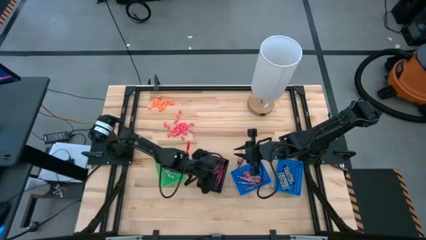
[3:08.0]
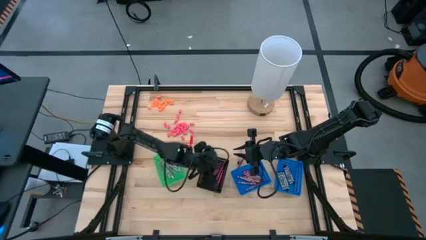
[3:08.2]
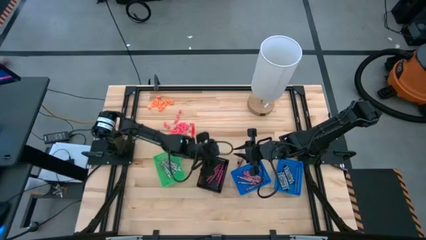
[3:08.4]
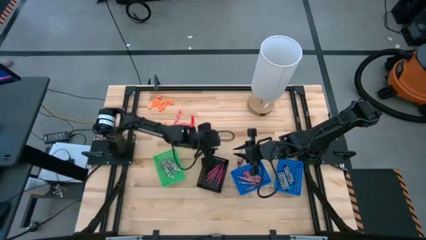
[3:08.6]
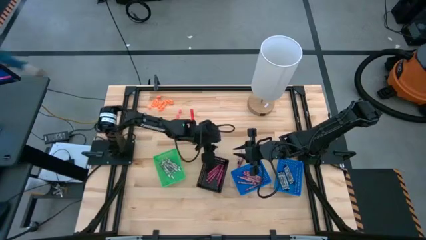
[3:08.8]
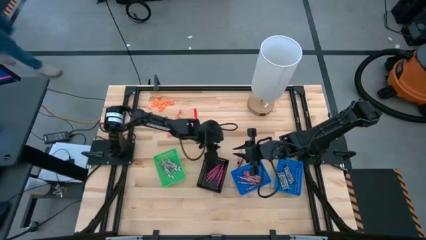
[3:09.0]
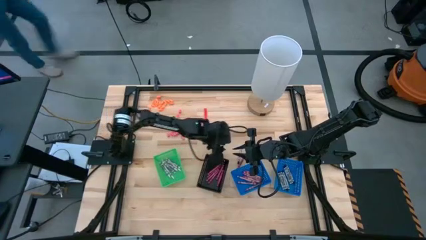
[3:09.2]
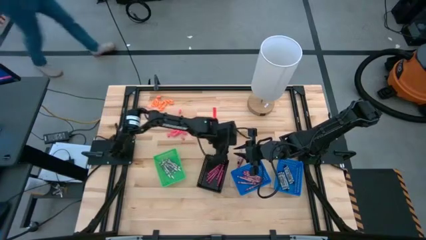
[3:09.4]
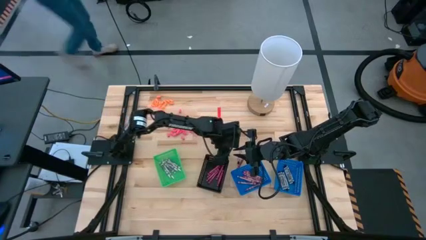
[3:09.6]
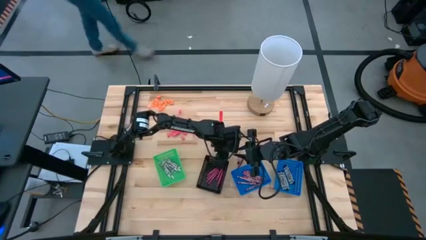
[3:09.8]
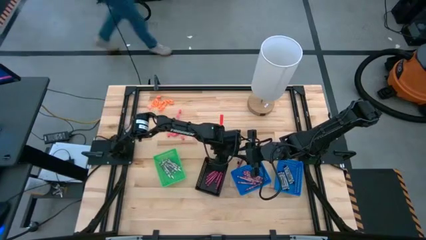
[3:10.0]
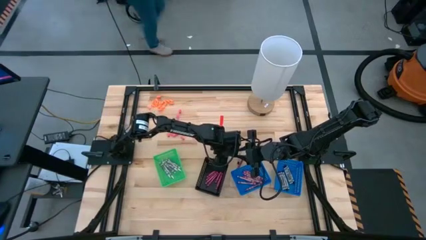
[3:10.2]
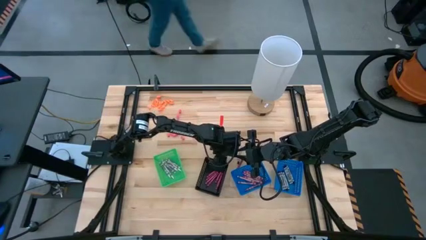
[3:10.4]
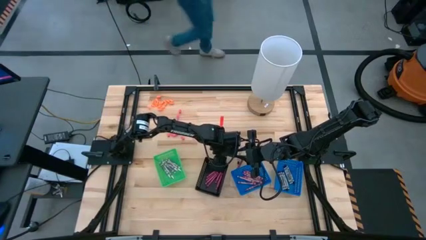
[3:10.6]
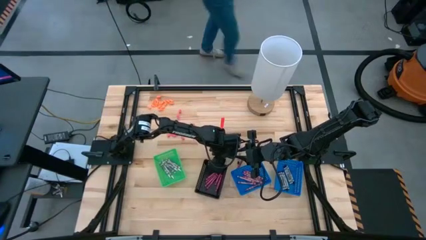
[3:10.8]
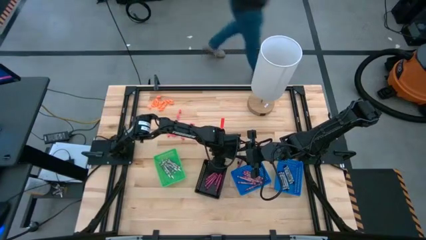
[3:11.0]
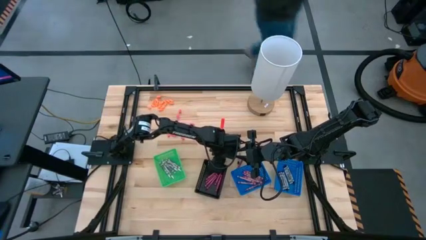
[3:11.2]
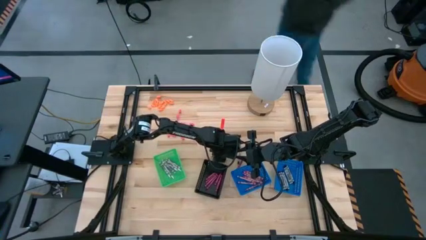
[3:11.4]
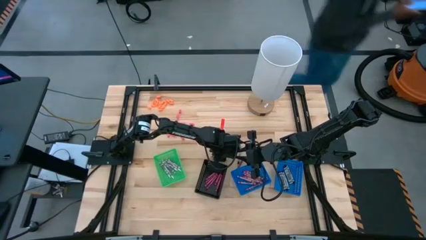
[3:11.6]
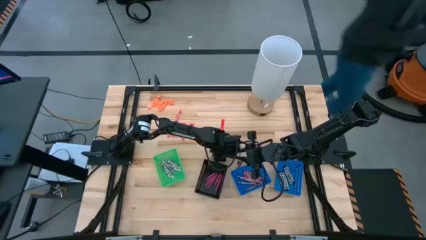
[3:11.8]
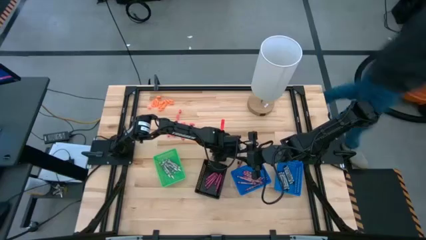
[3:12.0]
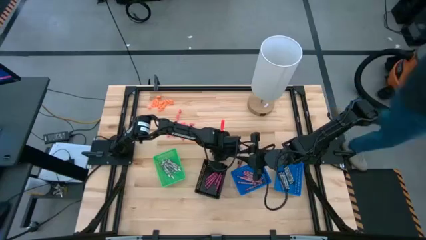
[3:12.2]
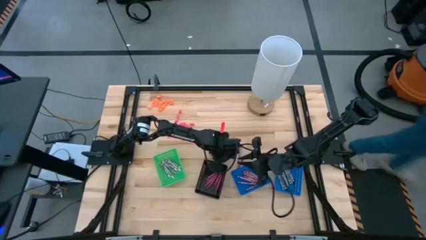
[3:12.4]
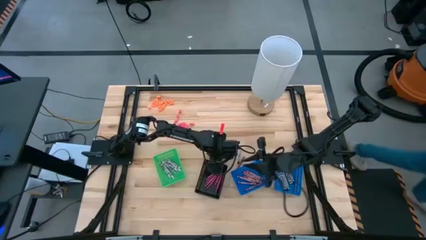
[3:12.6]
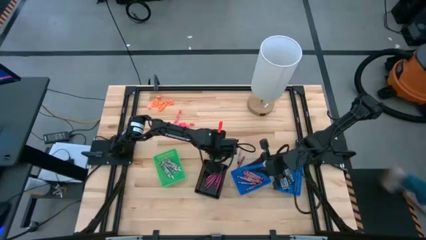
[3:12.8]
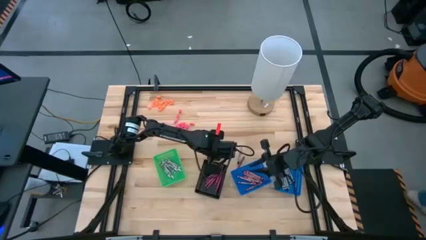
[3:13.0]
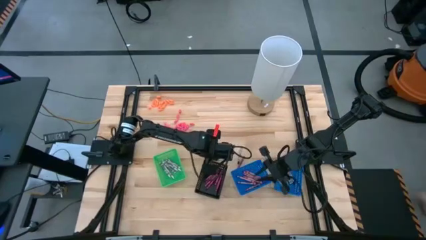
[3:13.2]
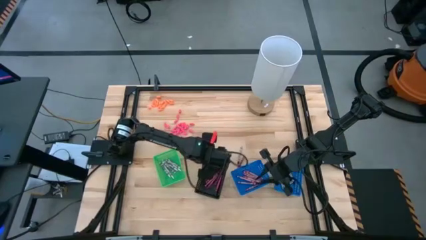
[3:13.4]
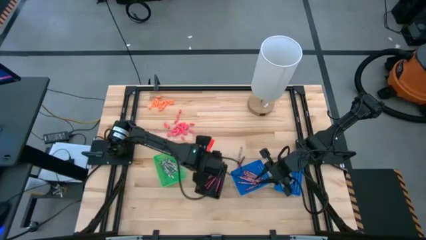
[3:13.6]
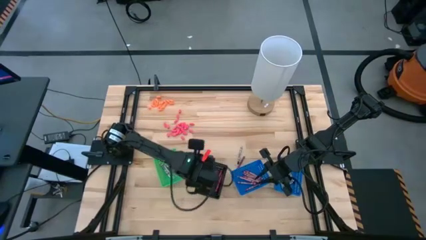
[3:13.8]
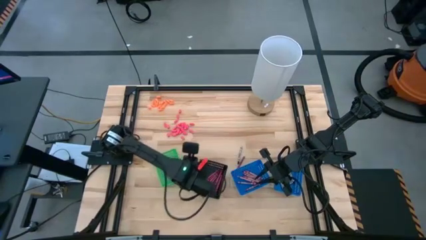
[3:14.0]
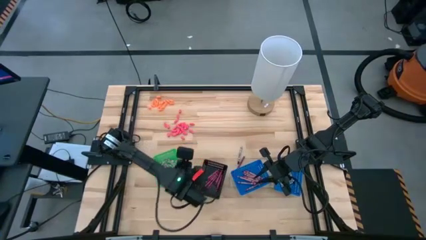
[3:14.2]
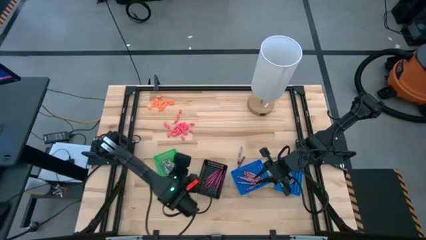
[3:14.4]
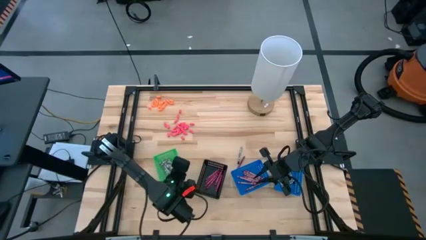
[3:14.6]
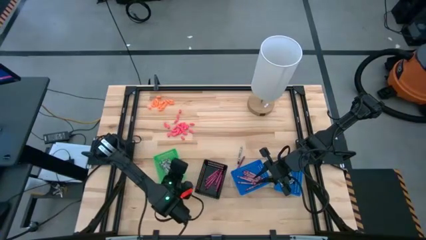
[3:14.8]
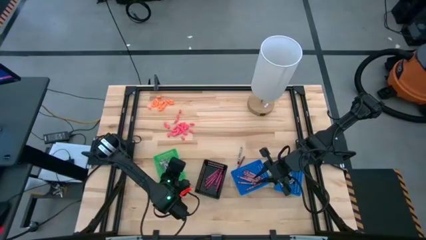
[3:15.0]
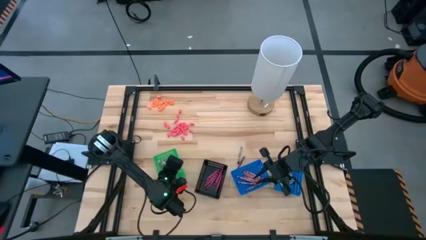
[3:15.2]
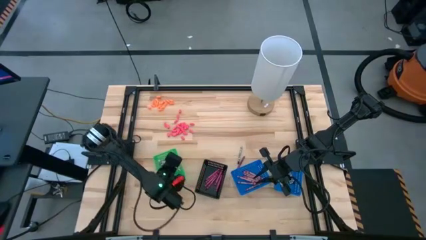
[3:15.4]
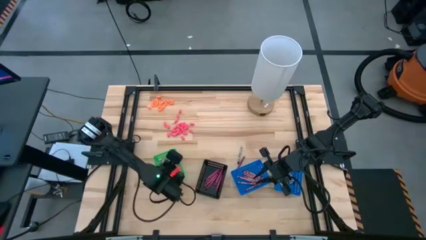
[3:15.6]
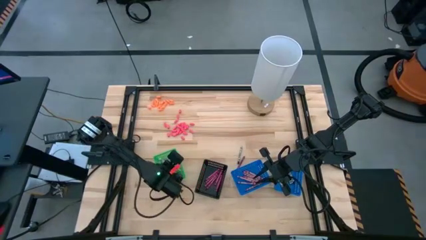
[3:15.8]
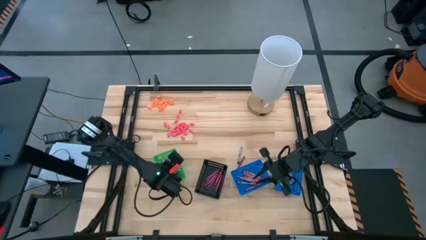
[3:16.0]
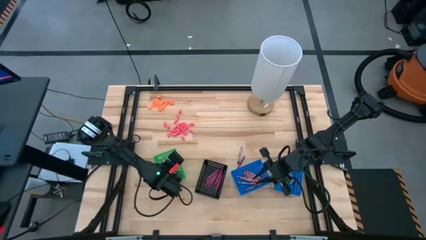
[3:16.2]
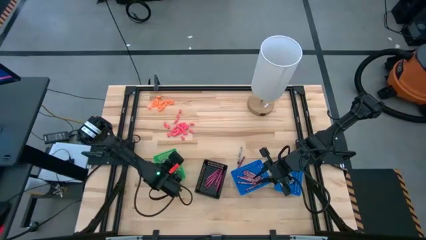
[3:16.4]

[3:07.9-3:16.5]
Task: Sort crayons
Put the white crayon into the green bin

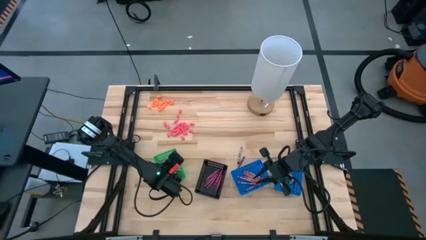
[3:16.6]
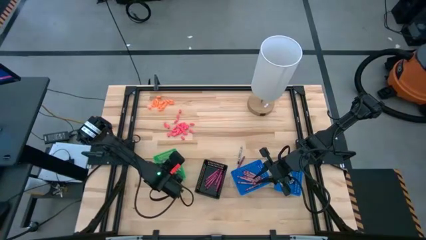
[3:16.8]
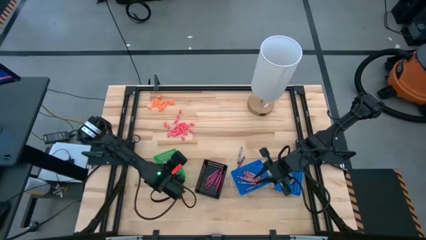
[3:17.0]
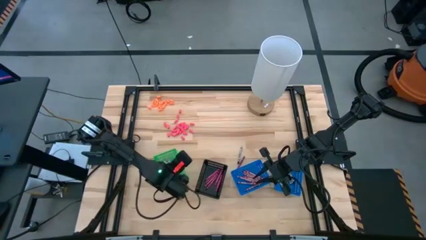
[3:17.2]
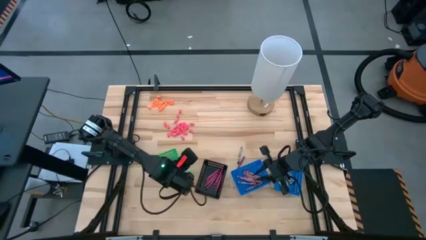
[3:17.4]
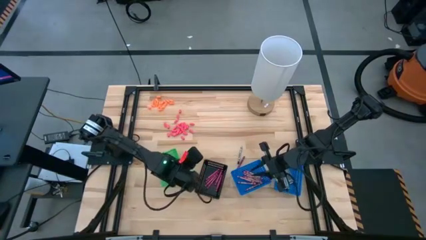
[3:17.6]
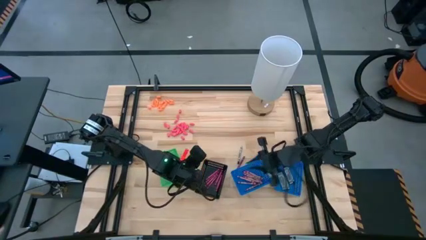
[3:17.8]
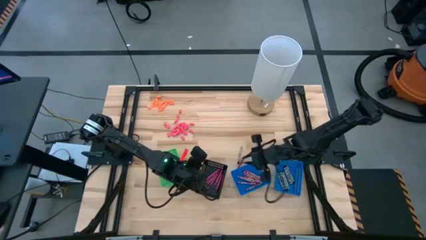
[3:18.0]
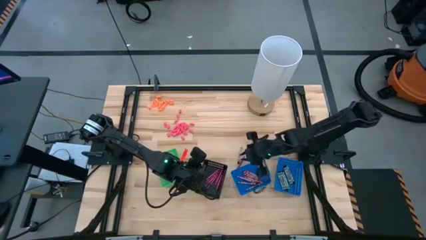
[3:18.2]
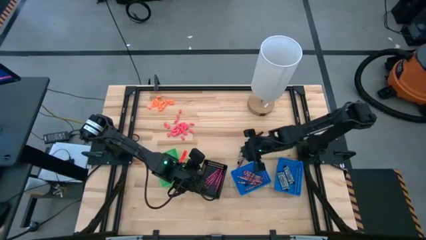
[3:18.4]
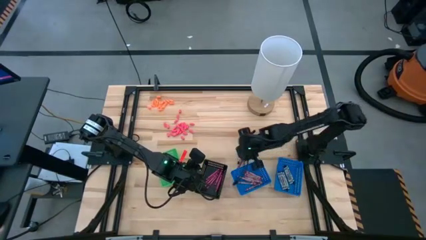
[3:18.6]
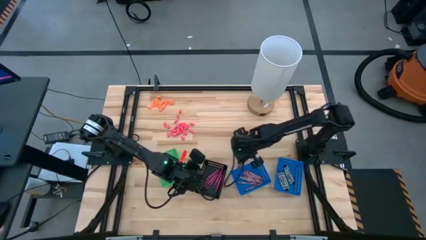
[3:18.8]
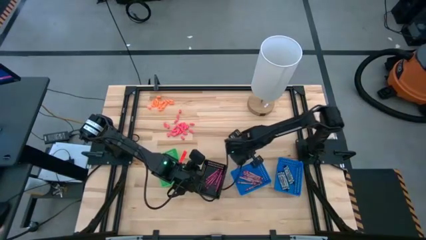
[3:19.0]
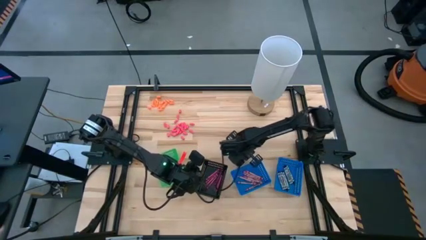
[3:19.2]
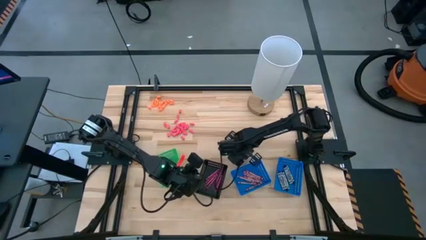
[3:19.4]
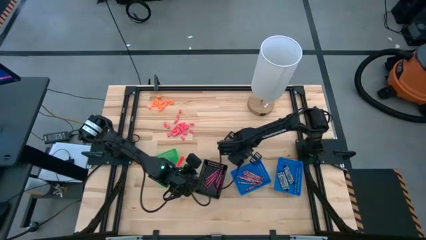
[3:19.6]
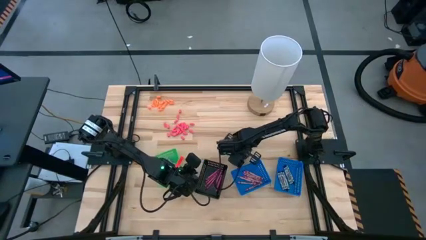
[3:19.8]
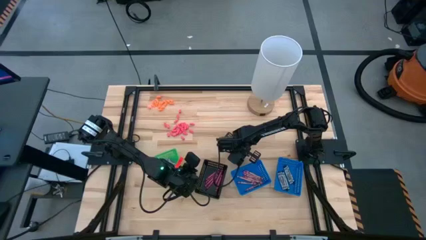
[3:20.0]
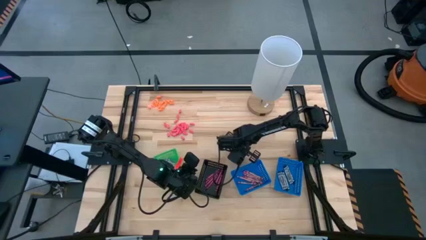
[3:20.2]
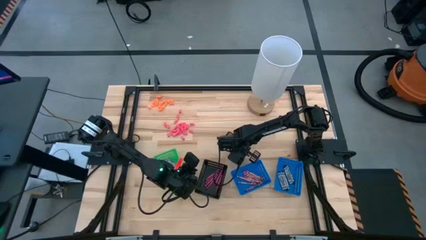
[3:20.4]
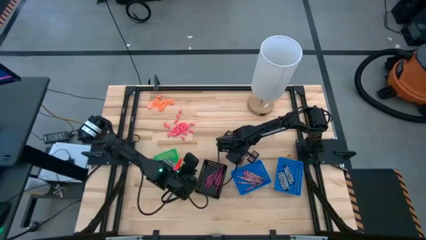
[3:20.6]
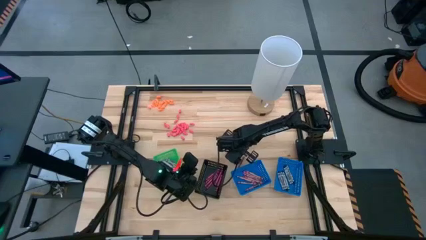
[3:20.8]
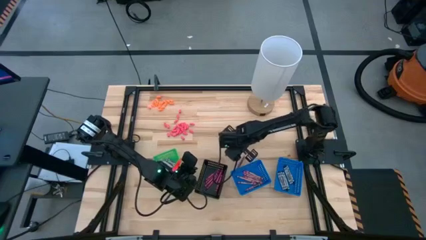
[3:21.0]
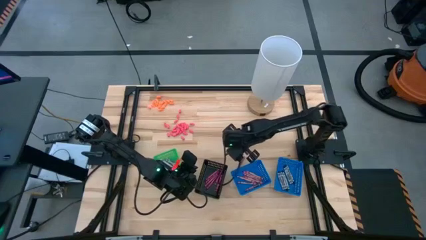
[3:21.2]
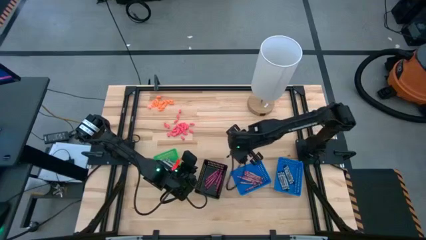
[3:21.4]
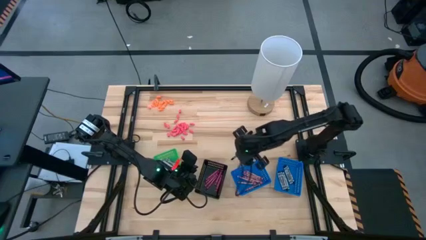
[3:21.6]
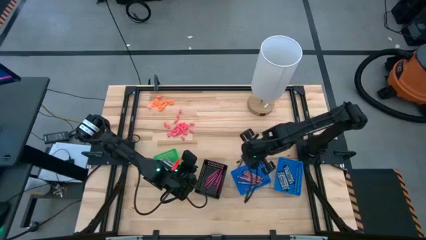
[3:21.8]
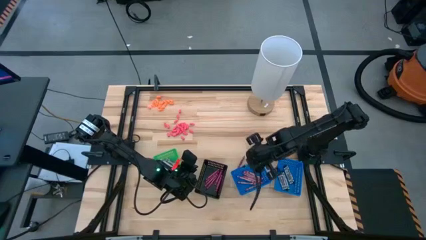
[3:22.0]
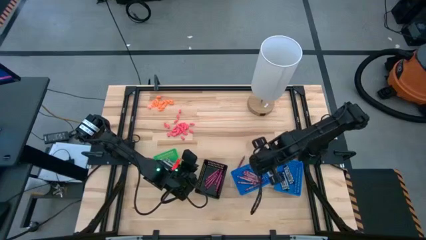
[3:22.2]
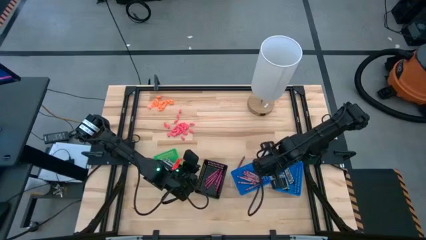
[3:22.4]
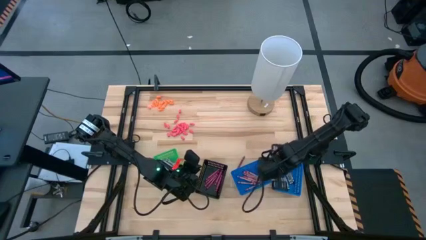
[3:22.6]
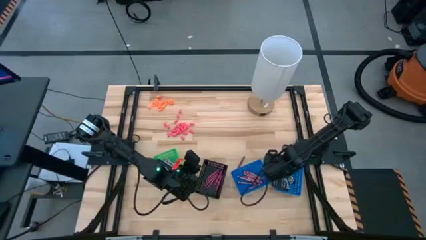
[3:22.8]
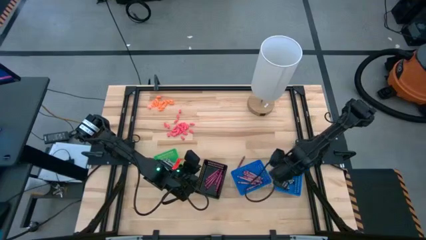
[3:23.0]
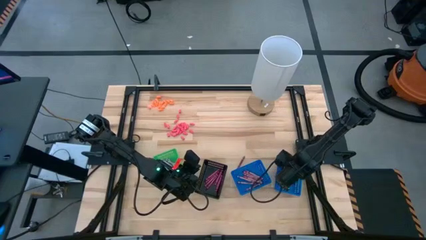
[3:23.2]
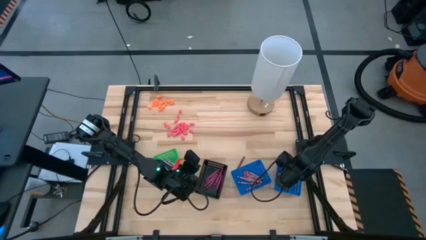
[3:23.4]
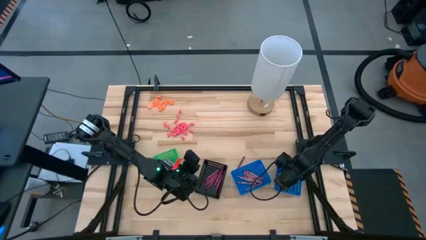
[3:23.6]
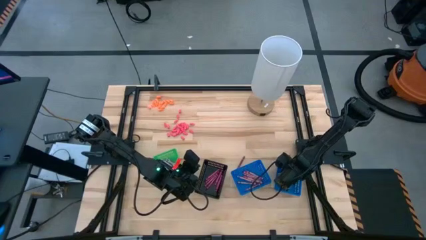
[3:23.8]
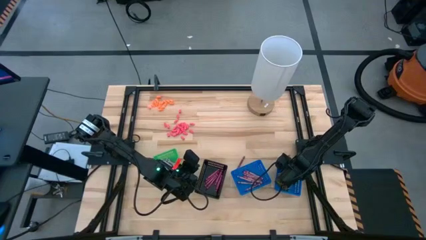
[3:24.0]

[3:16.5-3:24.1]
Put the black crayon into the right blue bin
